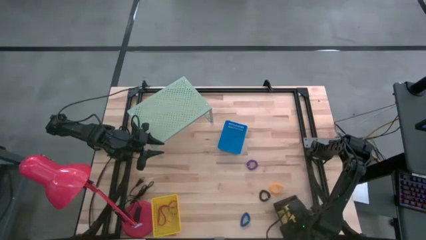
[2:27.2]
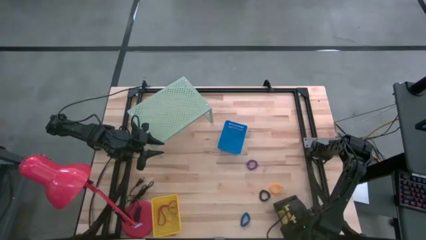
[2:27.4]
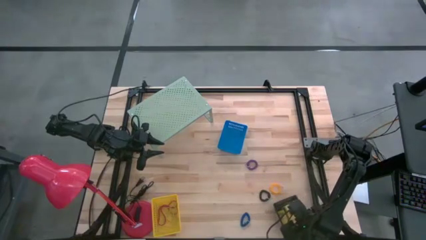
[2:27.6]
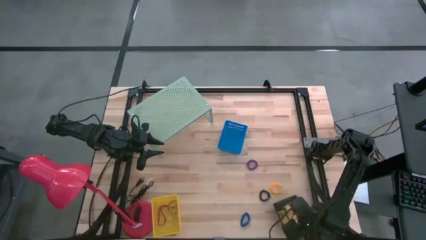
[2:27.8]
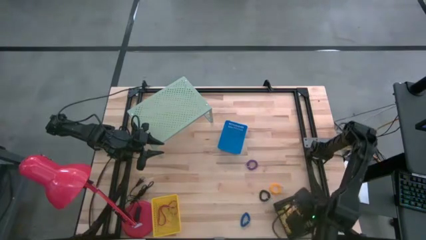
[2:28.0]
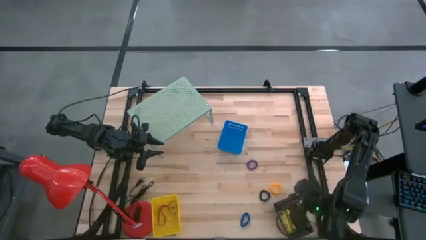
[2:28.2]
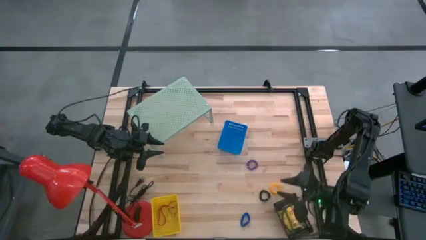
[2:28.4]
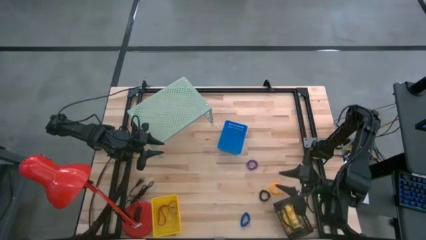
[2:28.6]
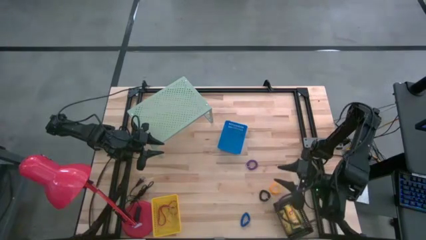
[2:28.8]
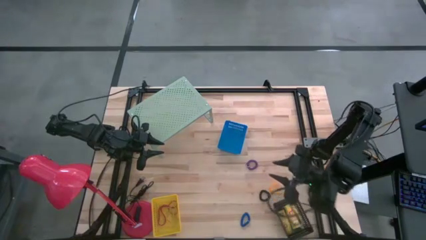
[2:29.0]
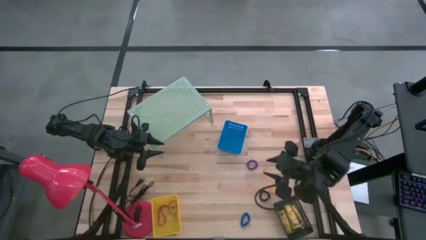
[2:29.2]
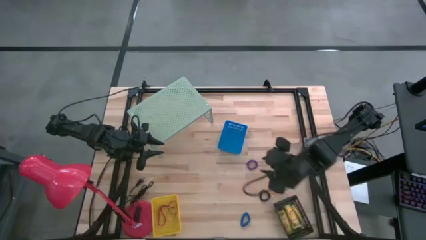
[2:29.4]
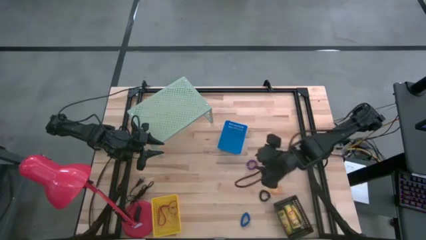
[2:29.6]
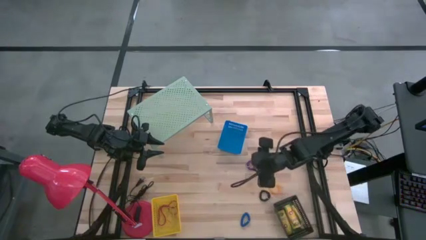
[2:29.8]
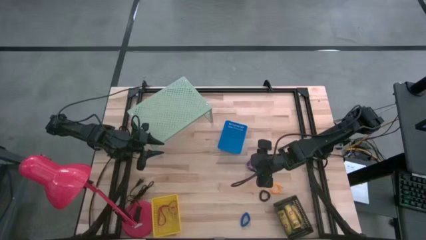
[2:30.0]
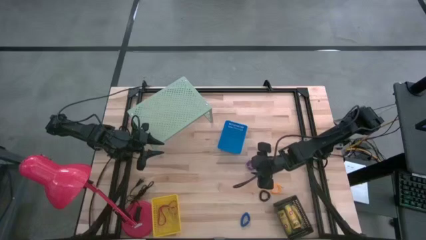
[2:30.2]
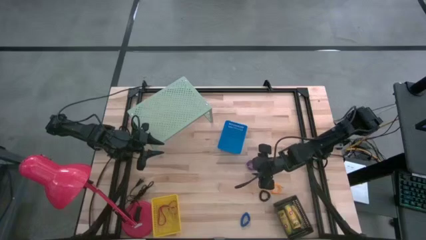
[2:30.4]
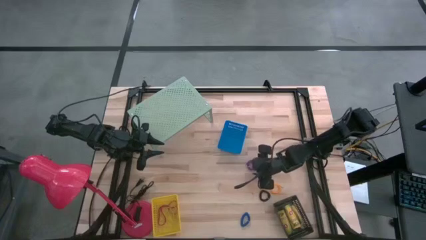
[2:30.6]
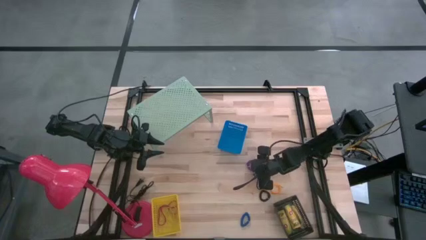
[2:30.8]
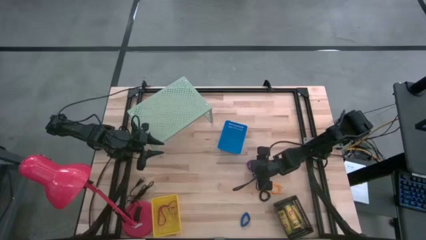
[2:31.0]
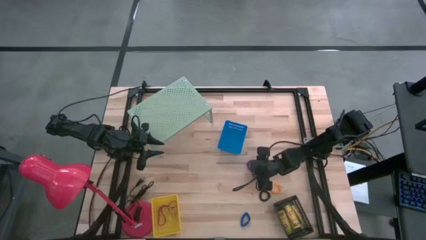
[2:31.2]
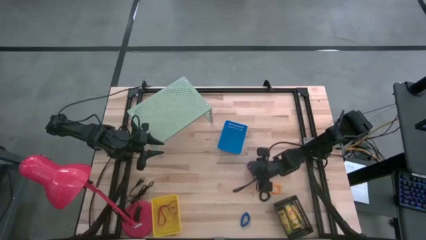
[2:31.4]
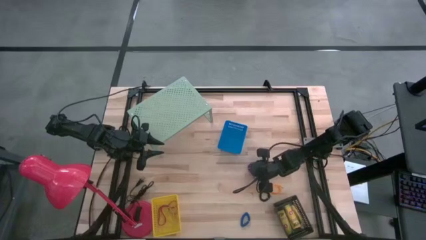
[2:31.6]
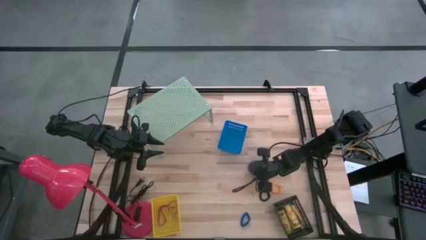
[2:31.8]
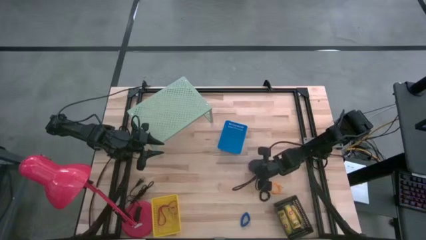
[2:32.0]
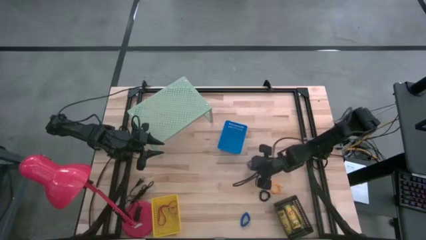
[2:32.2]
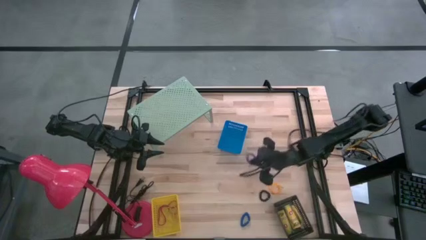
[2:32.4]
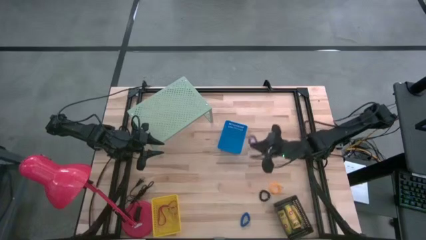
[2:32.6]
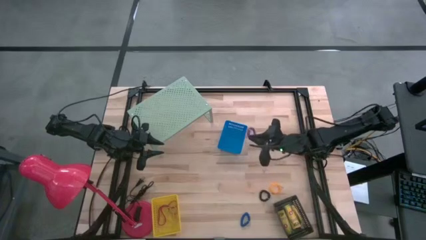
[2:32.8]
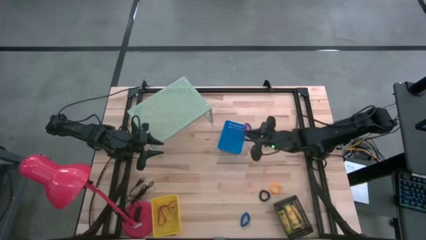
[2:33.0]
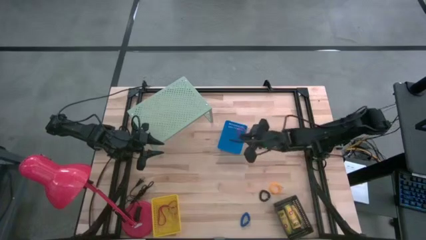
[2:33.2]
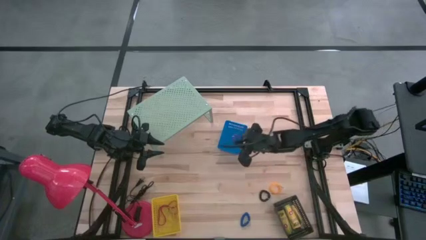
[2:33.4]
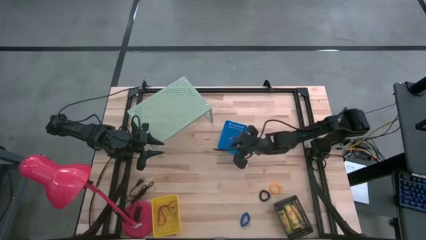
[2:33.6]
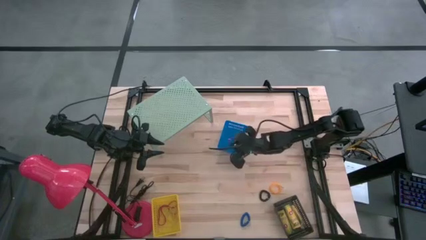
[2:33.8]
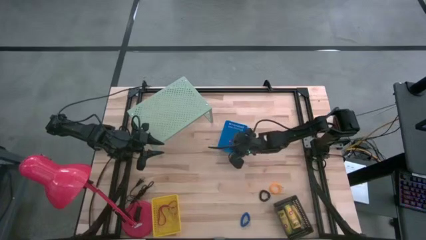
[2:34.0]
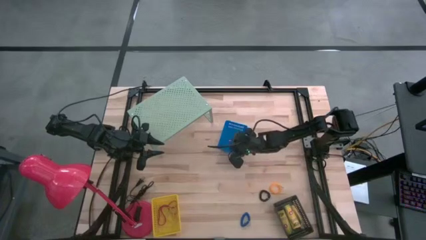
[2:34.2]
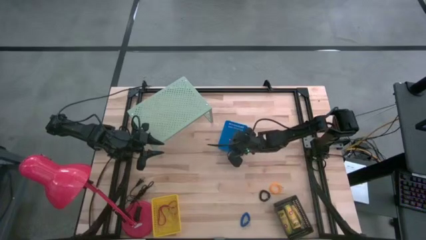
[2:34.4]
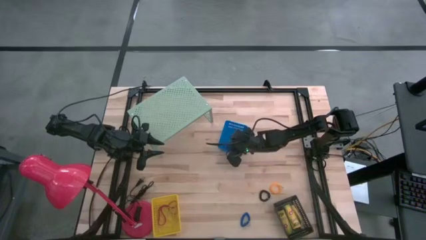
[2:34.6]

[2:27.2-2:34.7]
Task: Pick & Place Office Desk Supplies
Put the violet spring keychain into the blue basket

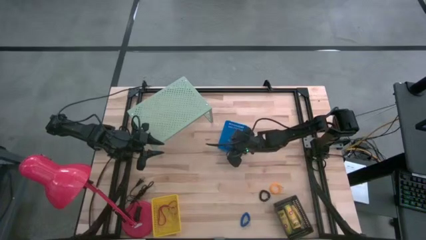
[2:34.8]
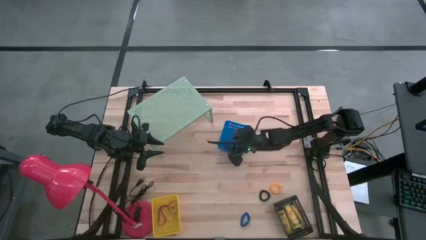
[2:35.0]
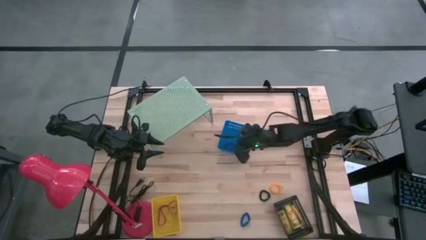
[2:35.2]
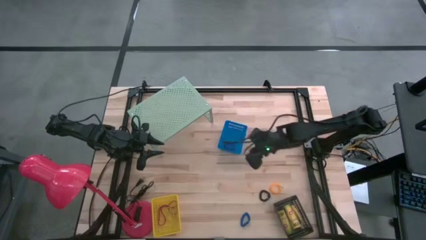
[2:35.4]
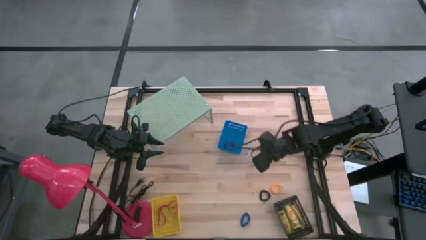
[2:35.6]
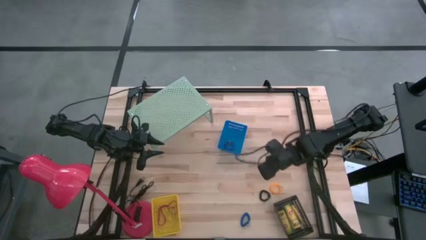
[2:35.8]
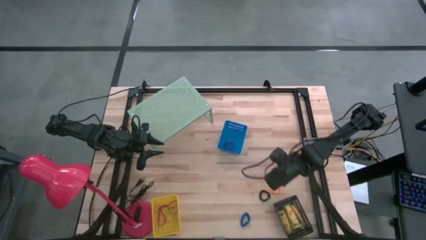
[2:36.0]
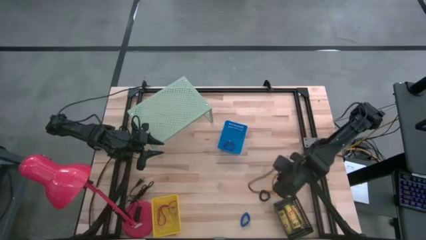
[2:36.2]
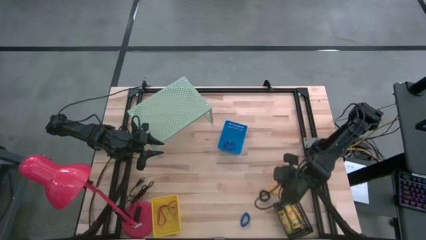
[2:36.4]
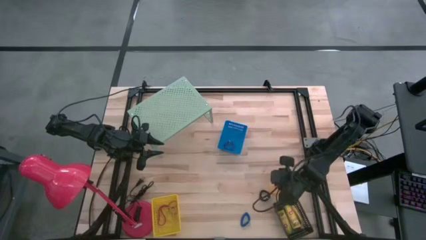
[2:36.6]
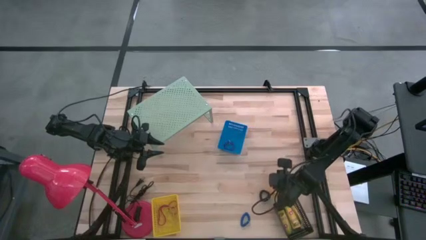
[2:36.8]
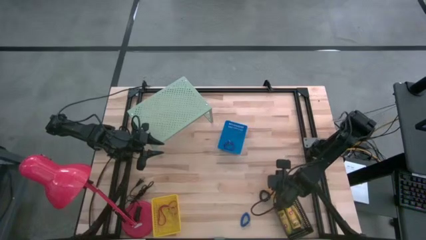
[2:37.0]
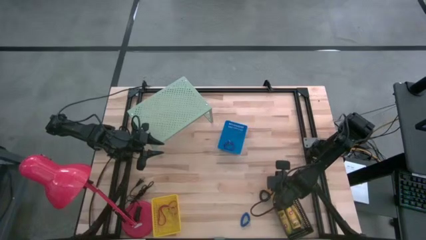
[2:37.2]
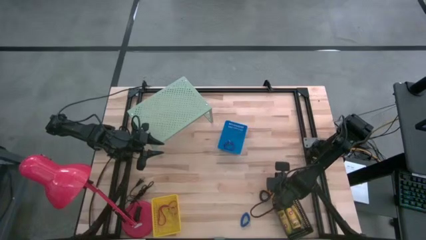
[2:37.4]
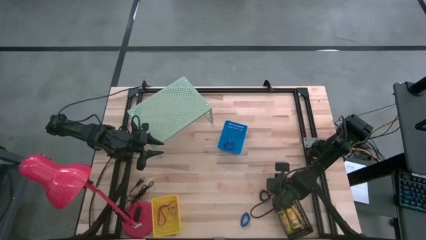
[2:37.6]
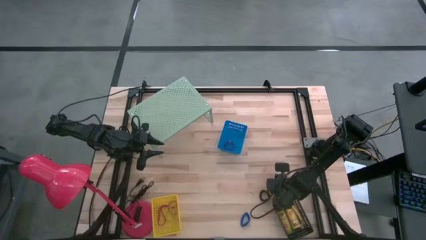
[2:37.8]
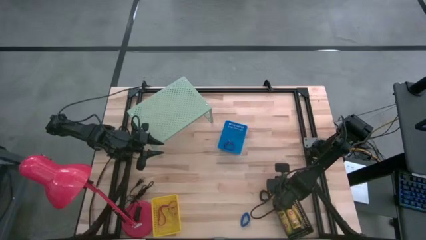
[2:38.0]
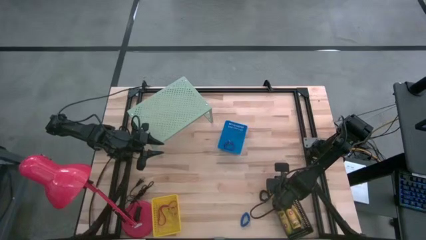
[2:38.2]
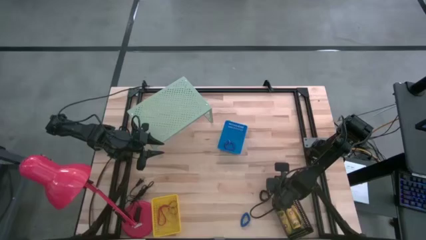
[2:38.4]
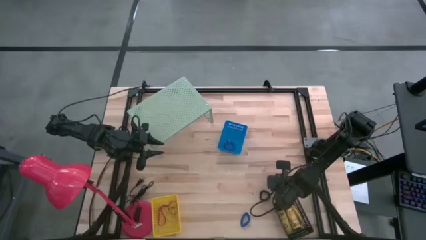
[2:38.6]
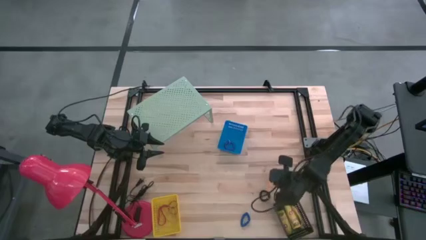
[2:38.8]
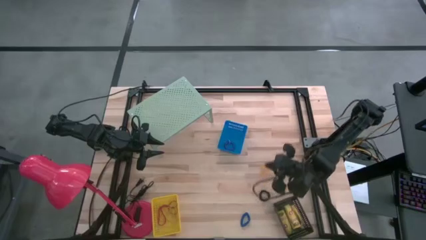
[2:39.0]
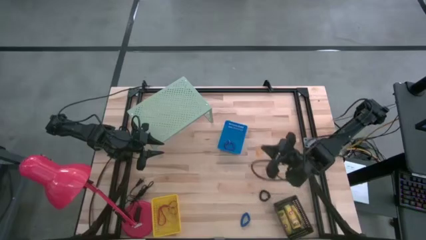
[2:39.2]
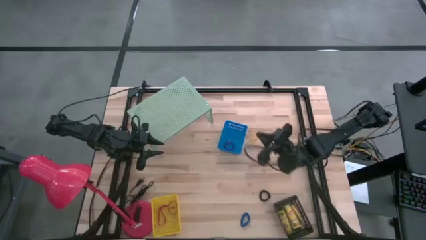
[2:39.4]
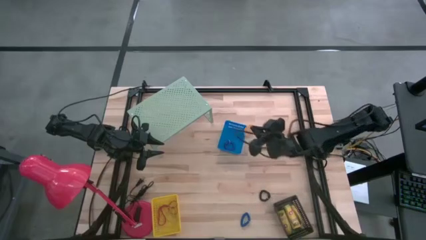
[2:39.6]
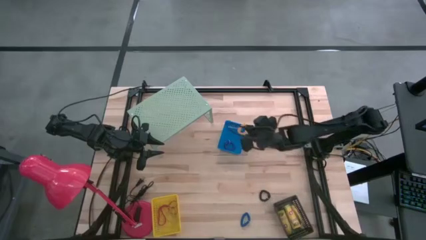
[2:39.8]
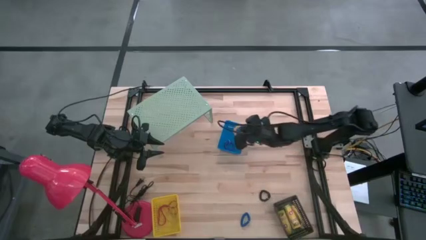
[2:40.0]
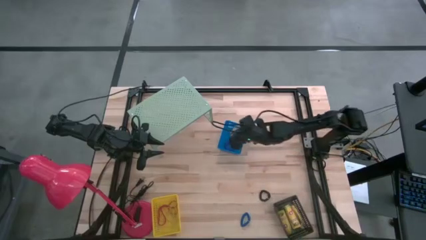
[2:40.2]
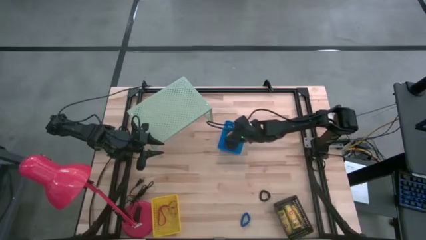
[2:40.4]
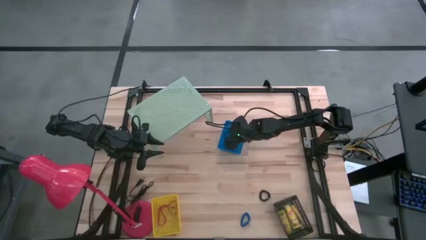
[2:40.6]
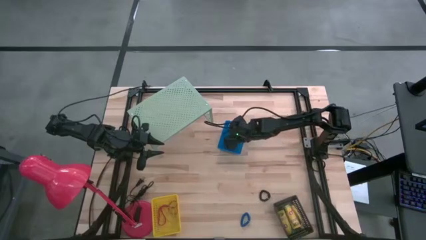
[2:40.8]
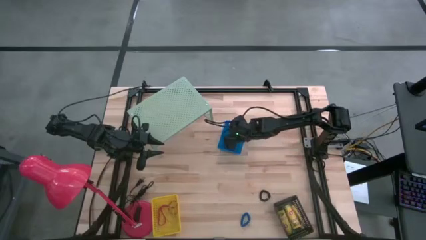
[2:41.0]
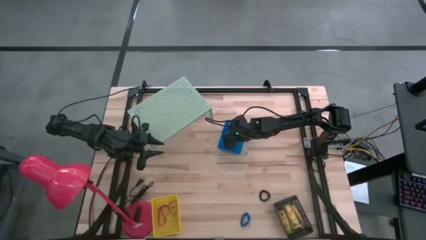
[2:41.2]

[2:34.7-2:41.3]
Put the yellow spring keychain into the blue basket

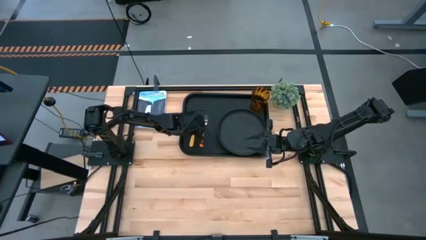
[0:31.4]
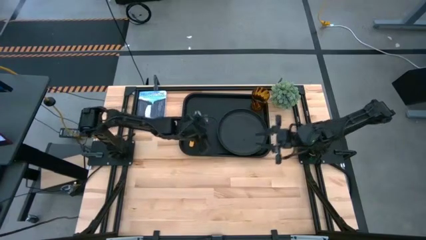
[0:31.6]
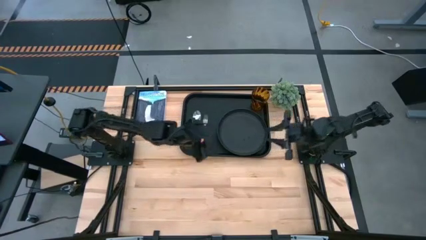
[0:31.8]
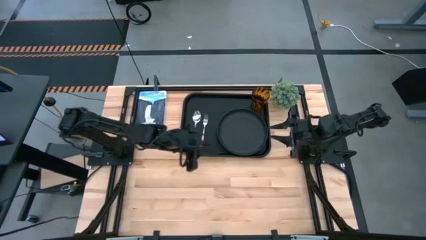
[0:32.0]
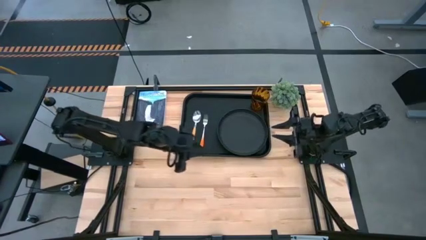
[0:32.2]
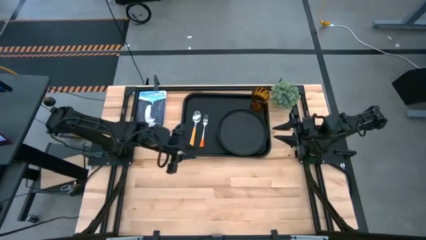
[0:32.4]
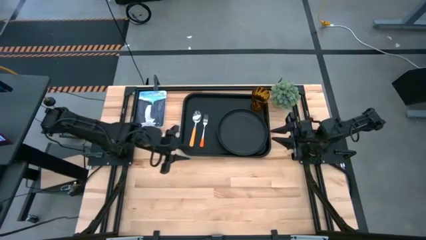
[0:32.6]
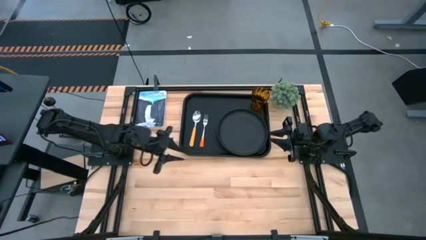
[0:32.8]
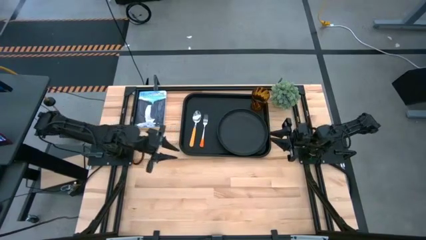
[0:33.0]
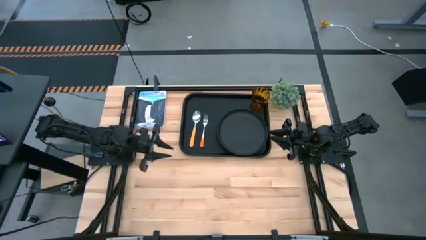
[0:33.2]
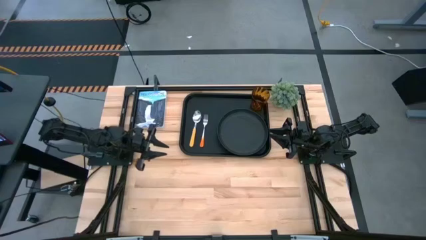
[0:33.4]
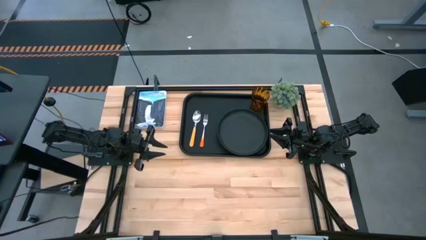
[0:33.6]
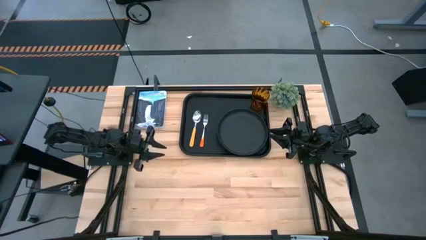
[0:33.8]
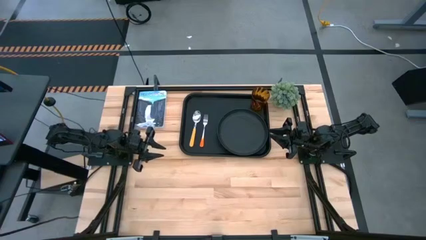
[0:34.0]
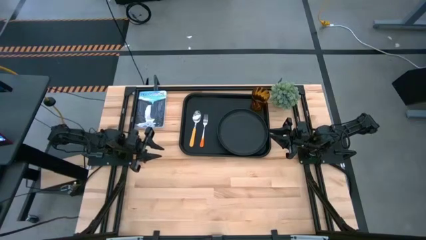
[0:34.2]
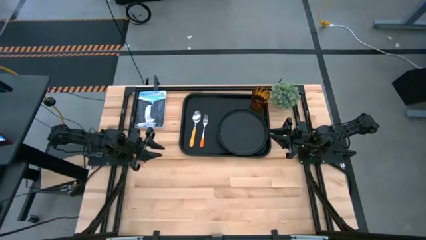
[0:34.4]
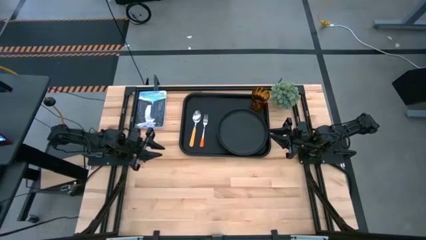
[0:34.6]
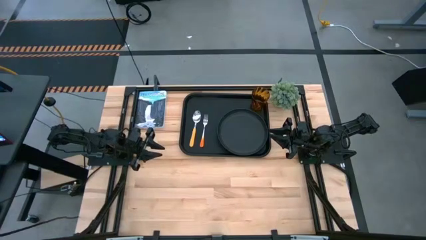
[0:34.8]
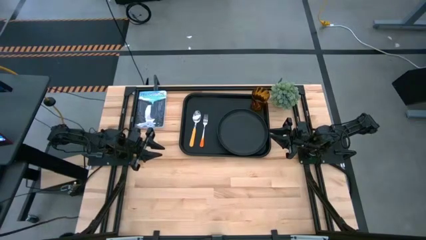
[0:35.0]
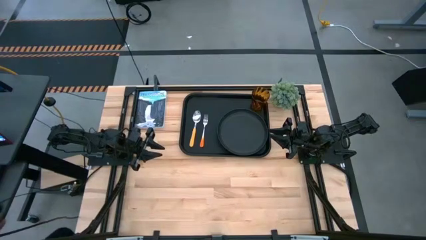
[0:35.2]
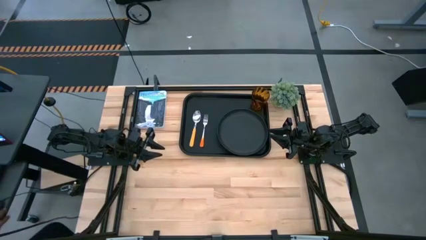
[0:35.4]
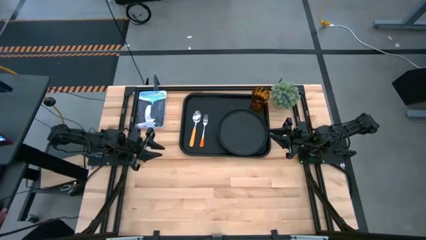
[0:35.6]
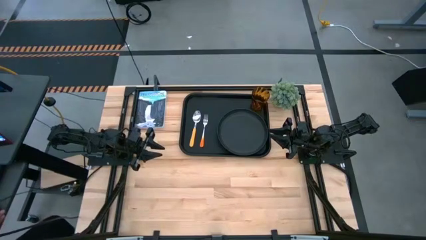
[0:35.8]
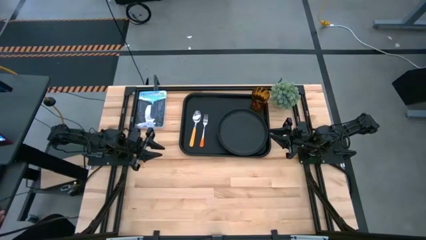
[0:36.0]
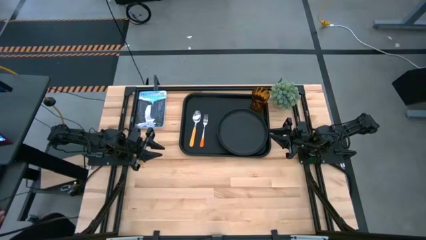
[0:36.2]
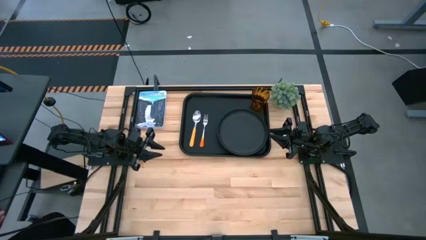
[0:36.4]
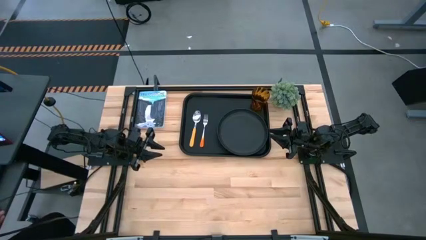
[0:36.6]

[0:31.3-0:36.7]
Task: Pick and place plate/cup/fork/spoon on tray
Return to Home Position
